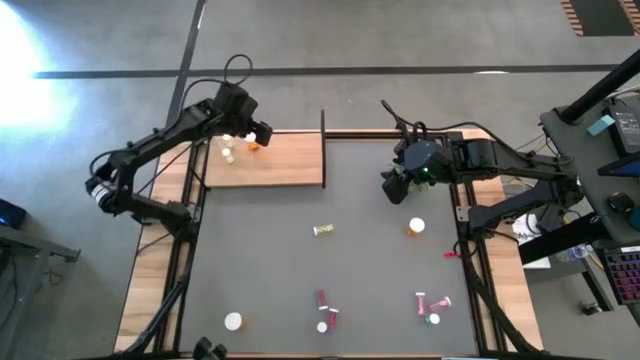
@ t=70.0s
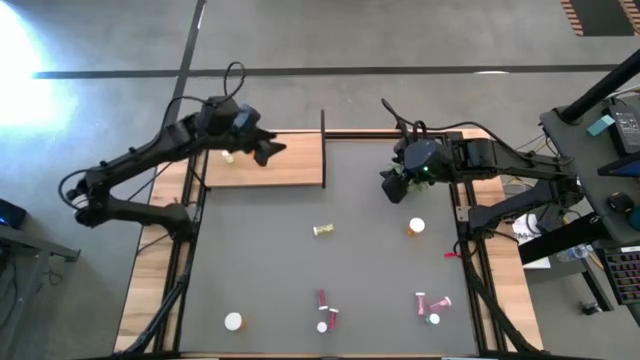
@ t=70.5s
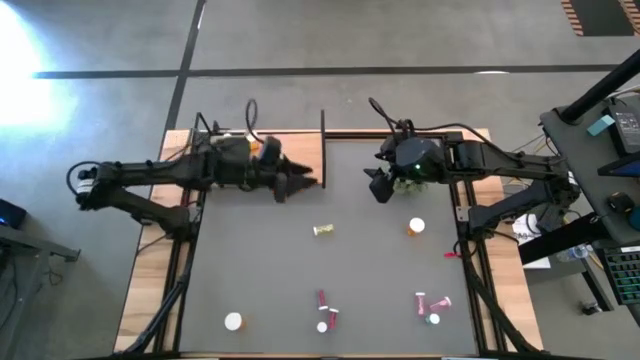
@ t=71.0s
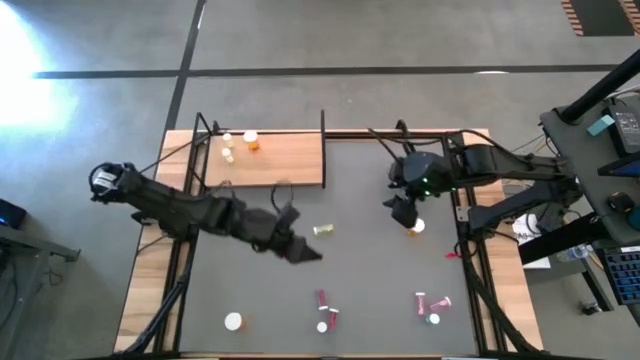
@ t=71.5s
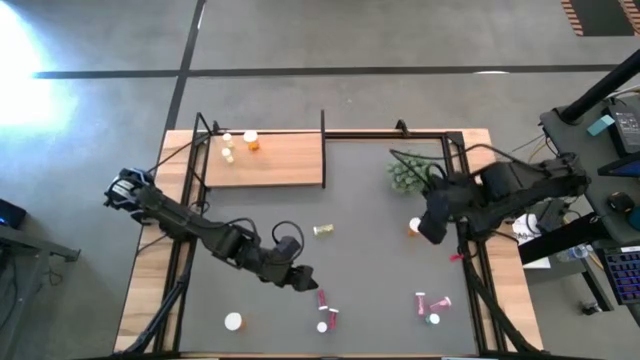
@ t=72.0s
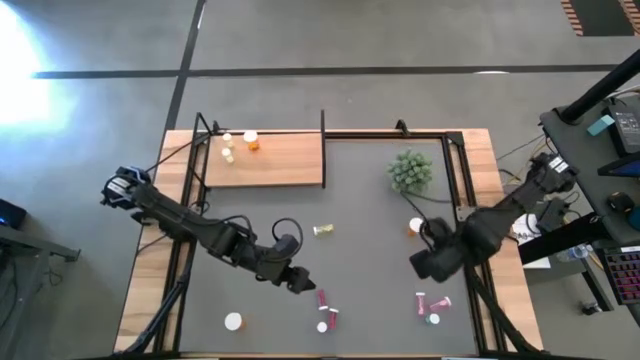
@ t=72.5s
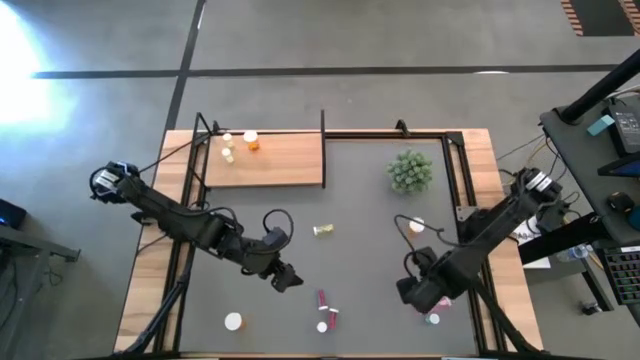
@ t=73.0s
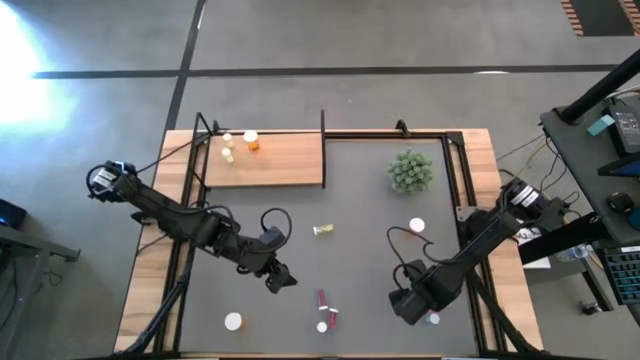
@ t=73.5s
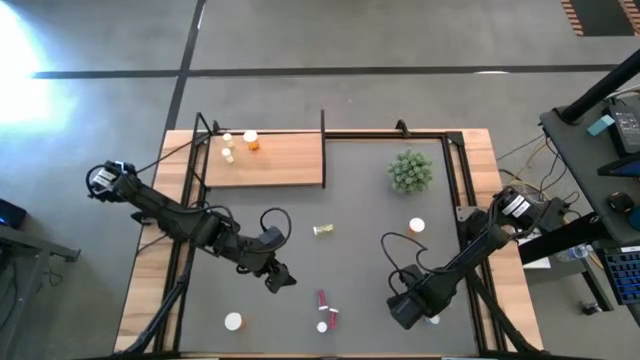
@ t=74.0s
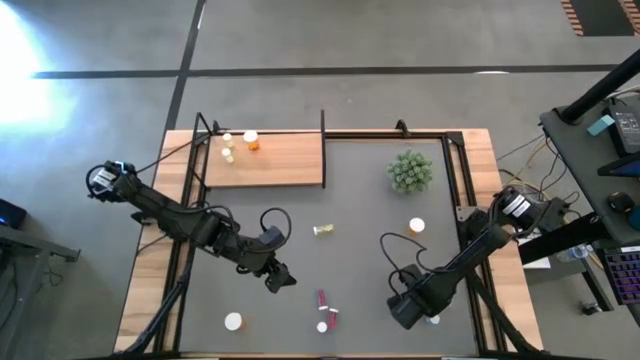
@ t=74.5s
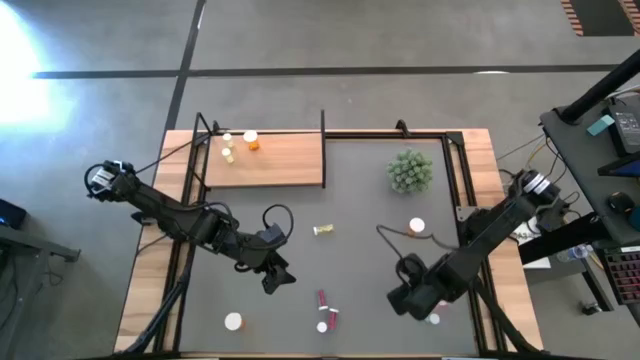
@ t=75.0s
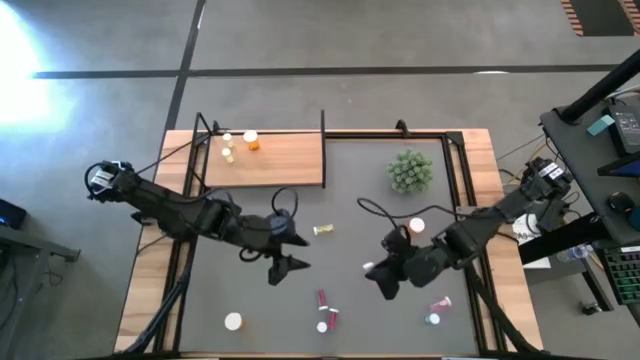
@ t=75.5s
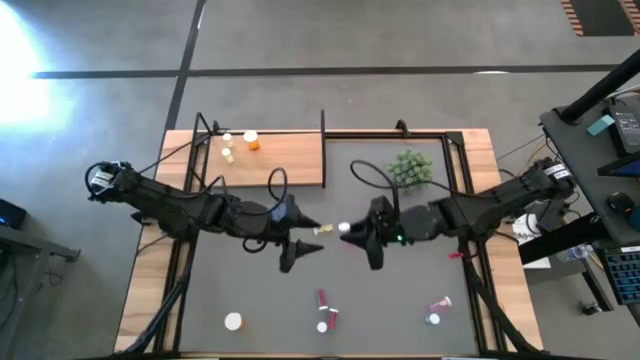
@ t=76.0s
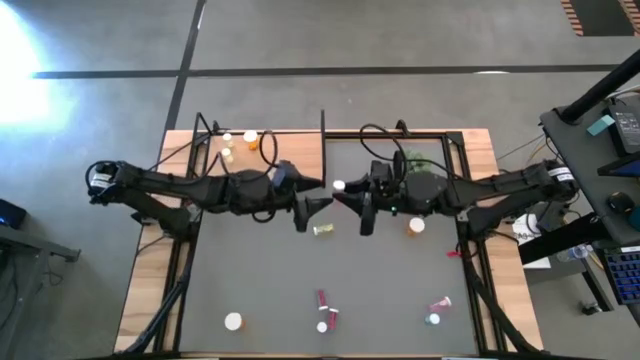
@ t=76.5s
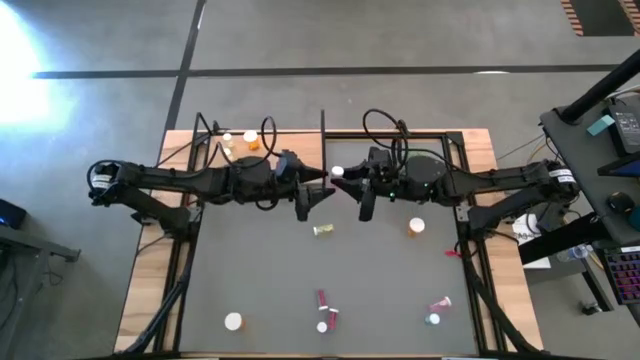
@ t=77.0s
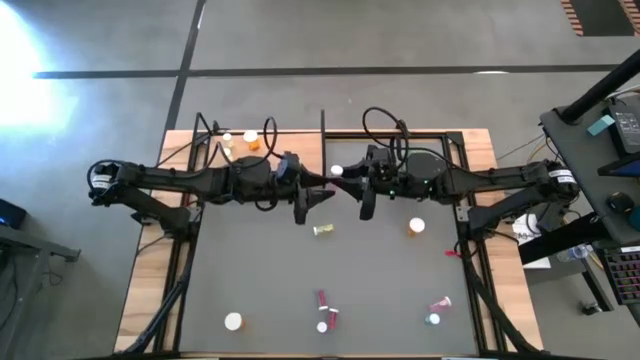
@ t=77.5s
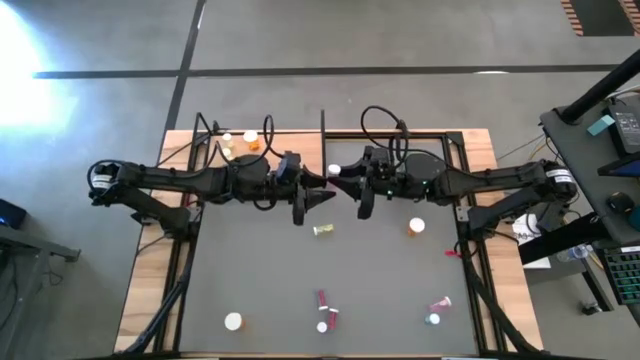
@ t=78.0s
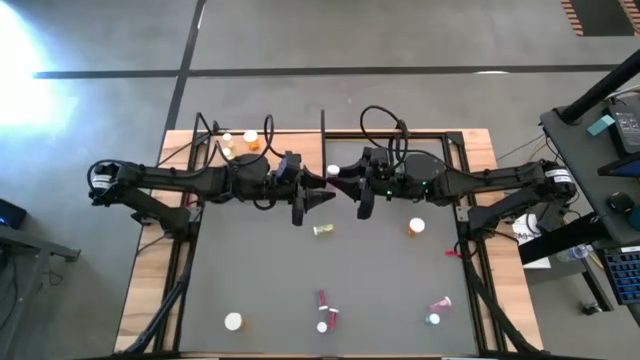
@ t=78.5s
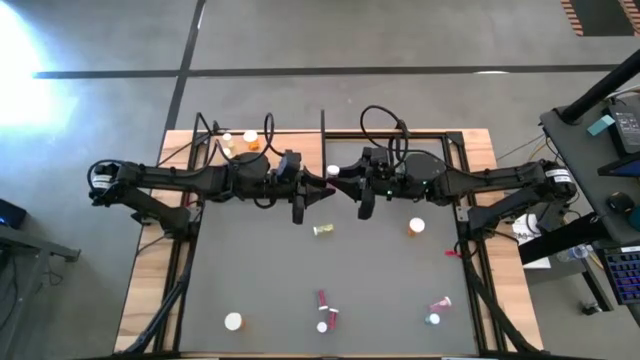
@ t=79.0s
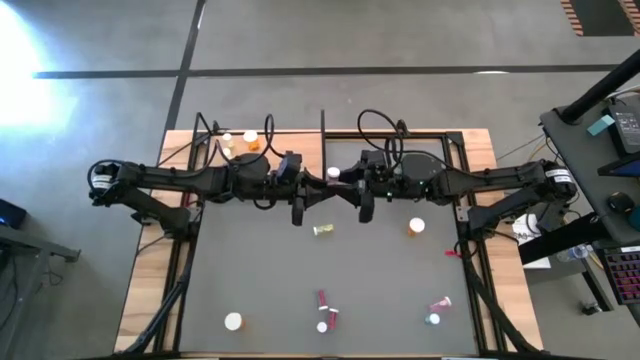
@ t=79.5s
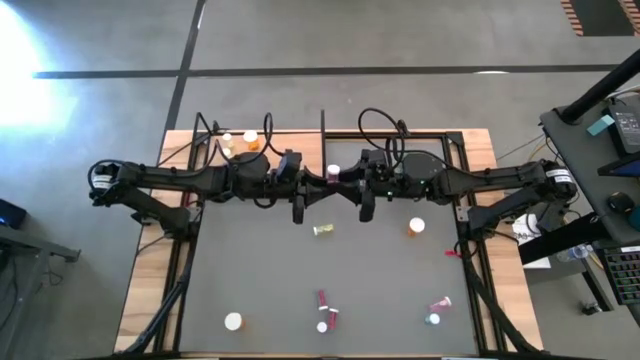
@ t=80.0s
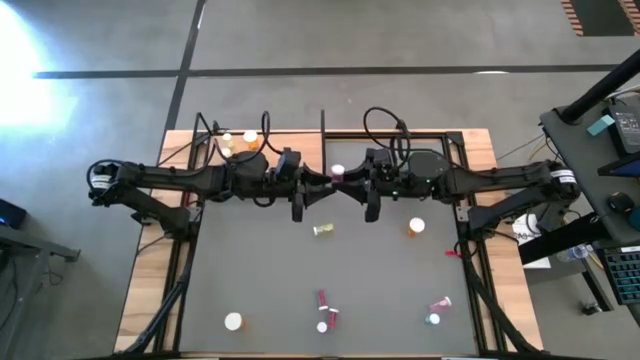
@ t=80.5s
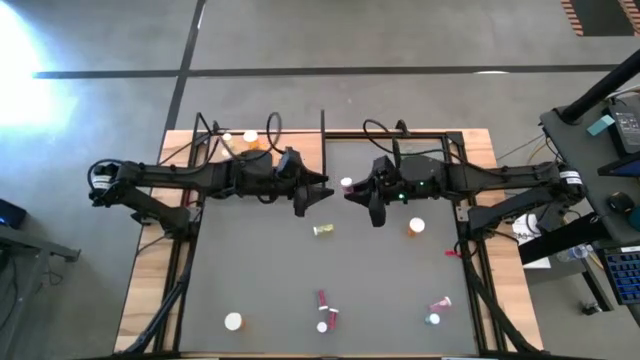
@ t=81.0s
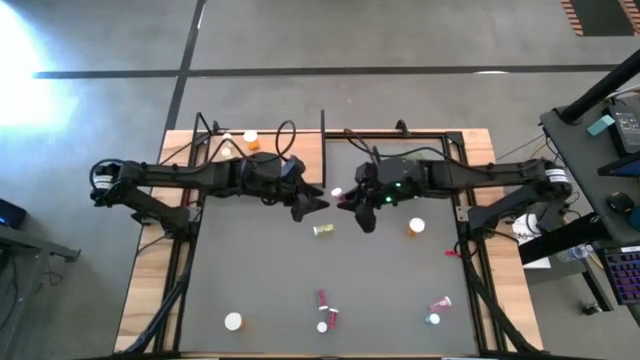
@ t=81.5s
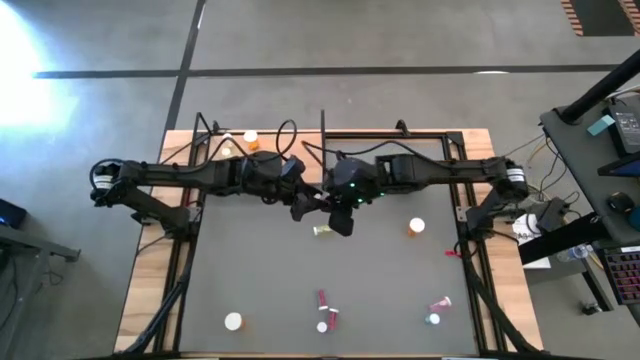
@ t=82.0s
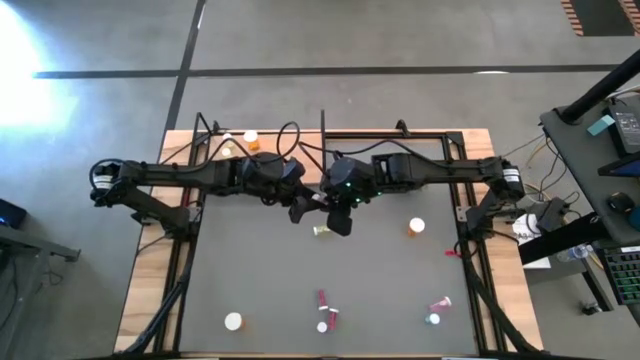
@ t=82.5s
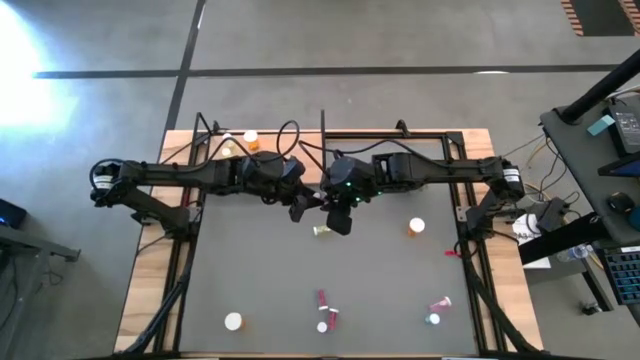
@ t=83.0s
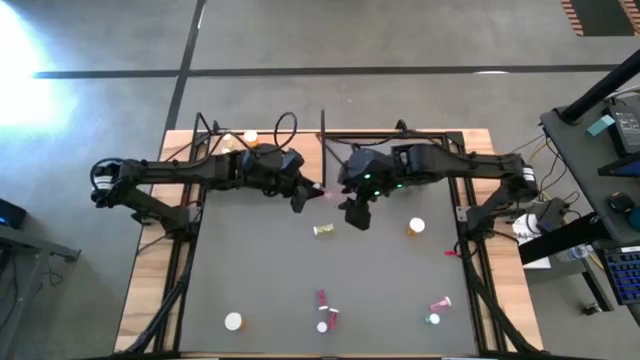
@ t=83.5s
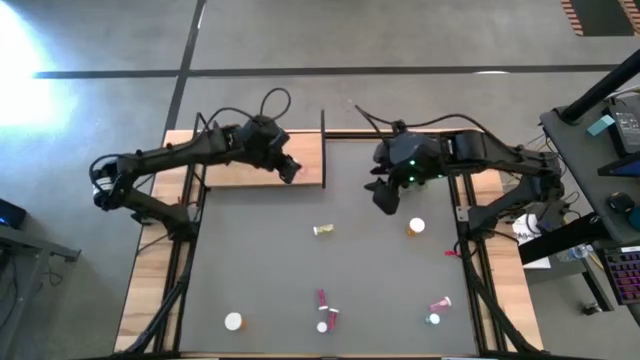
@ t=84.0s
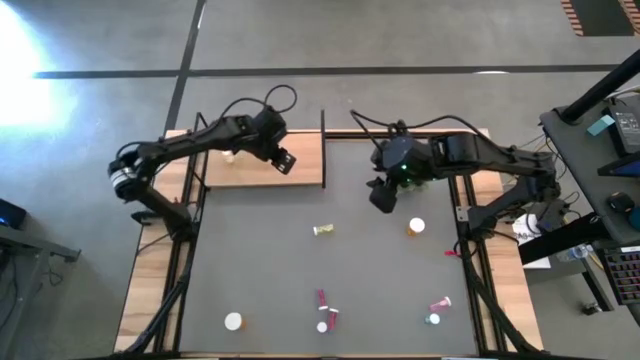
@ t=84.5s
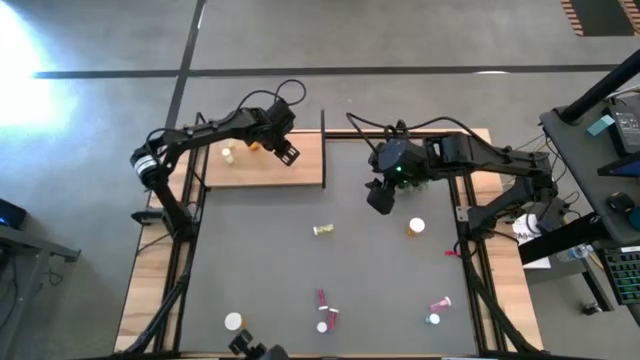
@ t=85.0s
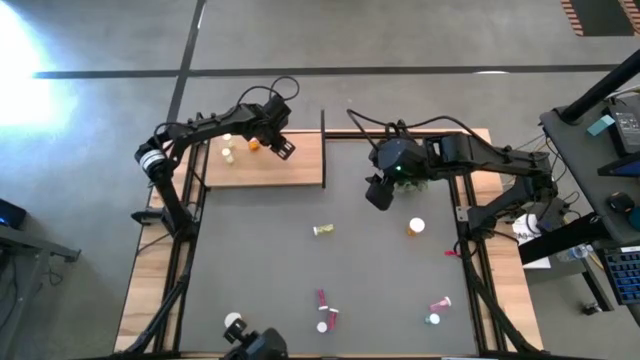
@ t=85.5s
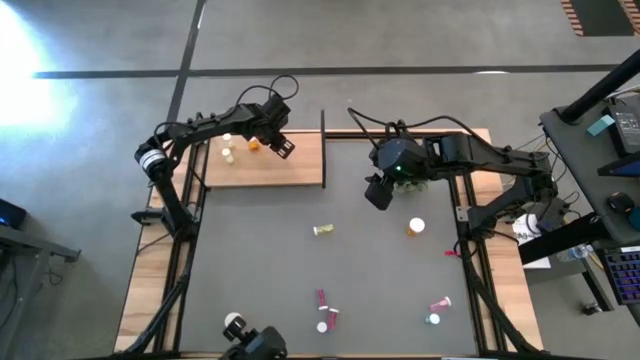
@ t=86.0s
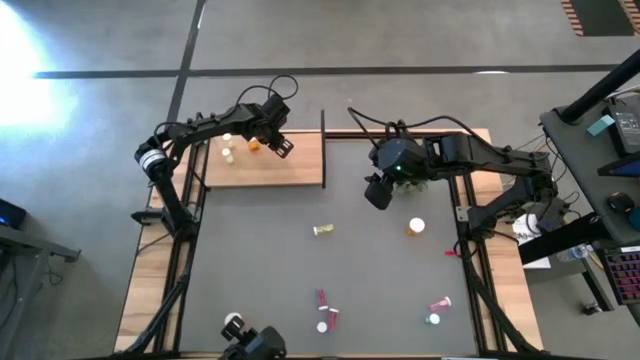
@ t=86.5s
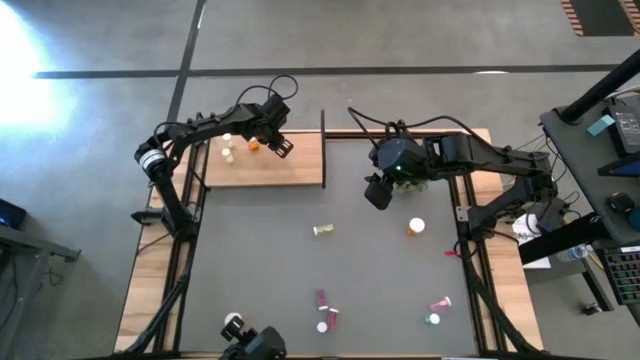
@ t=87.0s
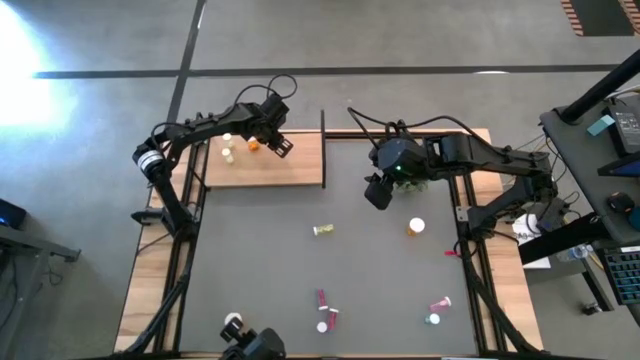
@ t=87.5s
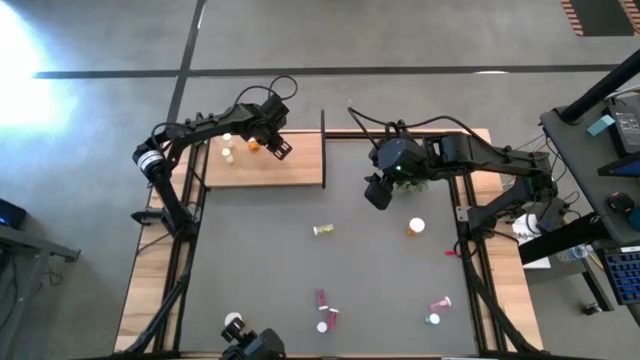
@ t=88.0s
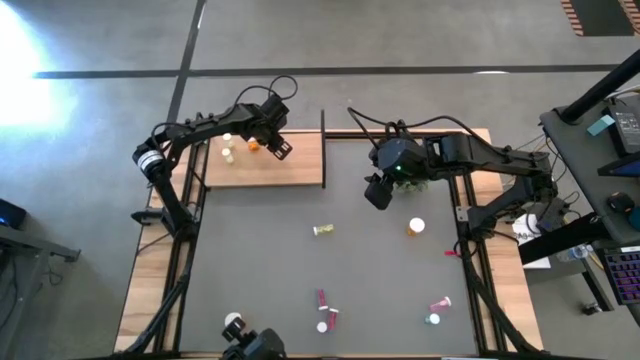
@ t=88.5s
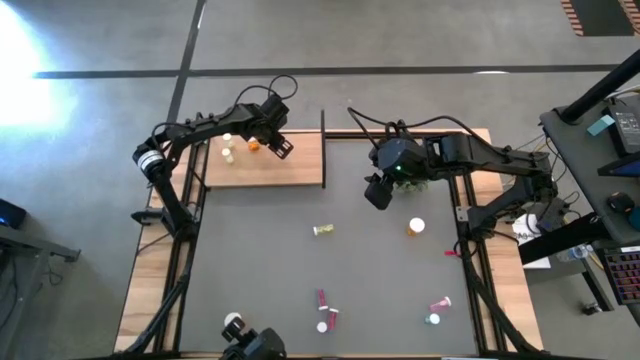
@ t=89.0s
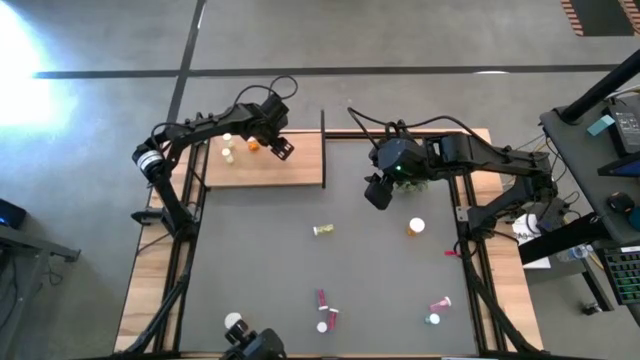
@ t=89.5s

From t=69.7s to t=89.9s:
Task: Pick and place medicine bottles onto shelf by color
Put the top left pink pill bottle on the shelf
